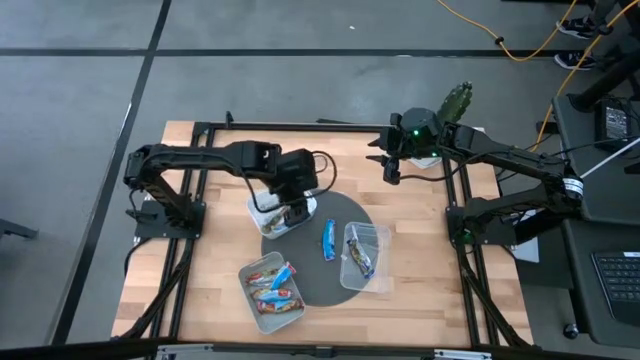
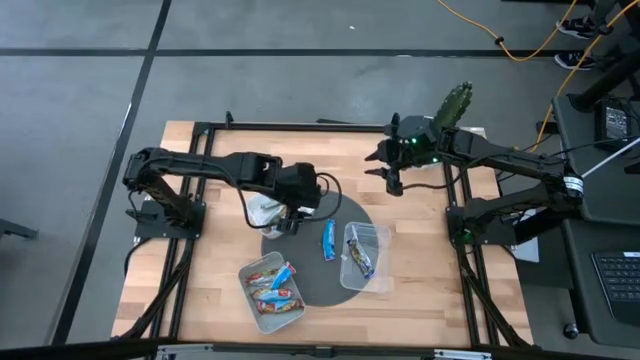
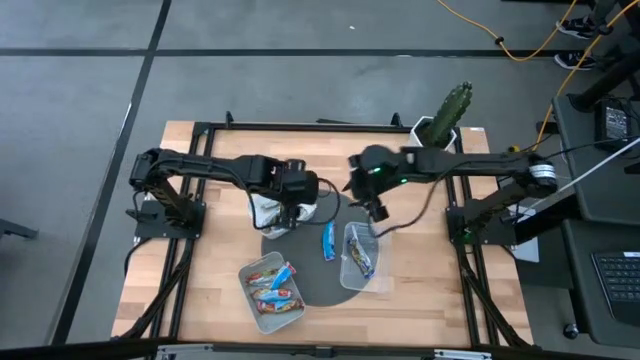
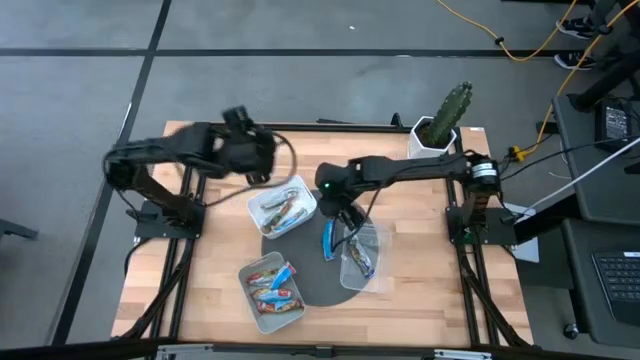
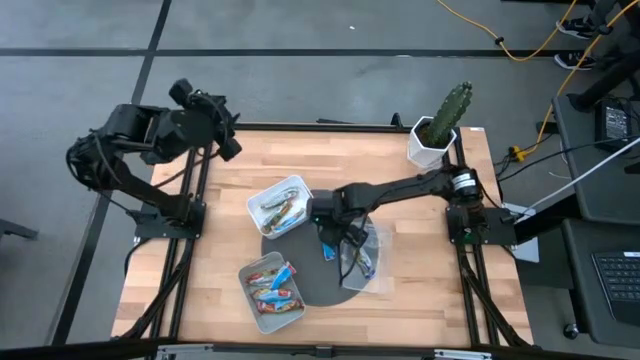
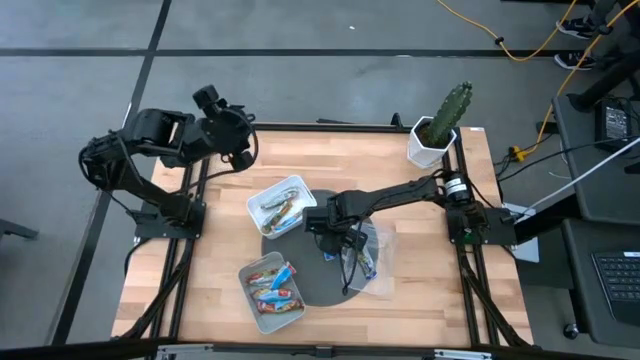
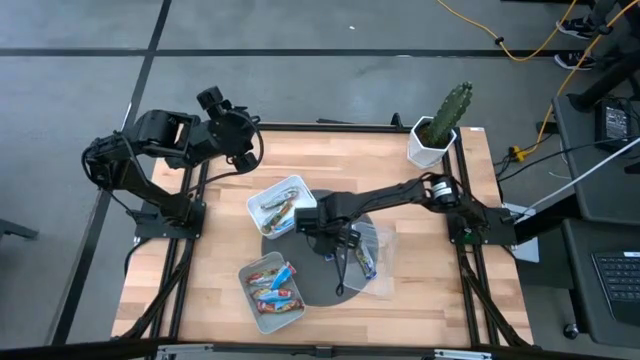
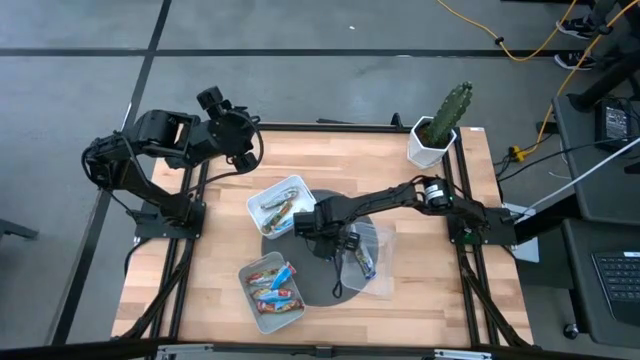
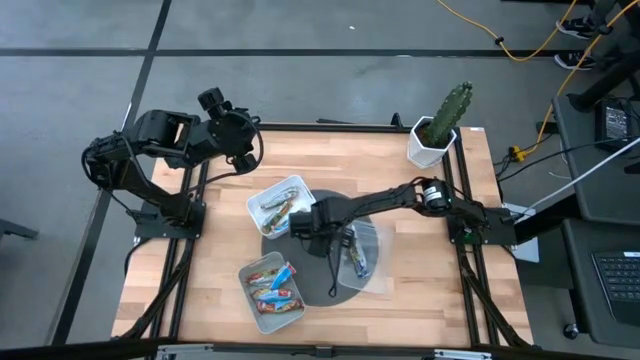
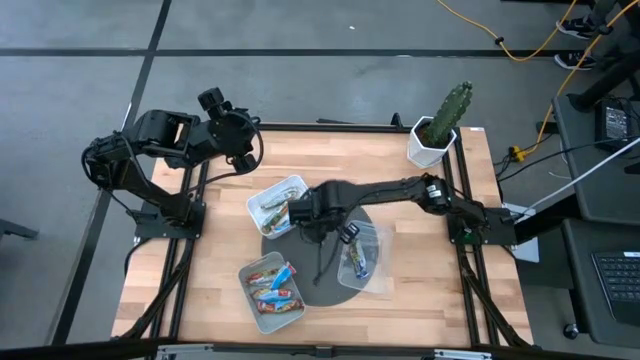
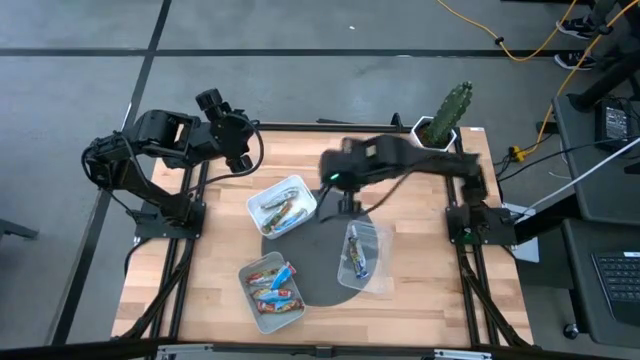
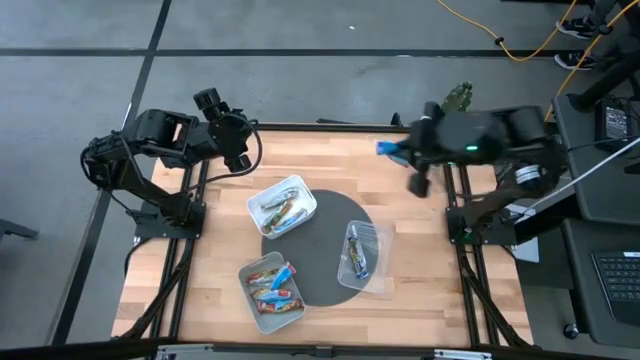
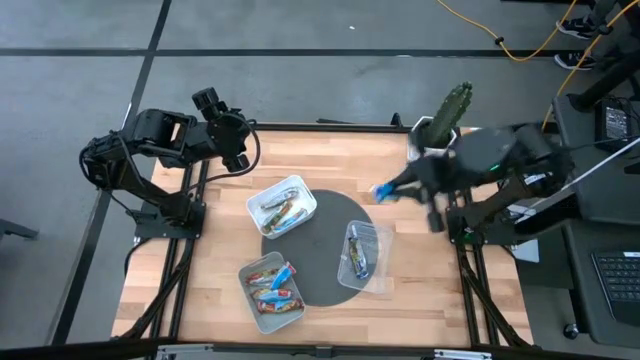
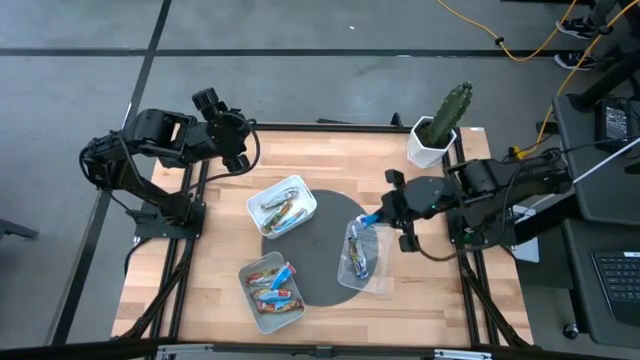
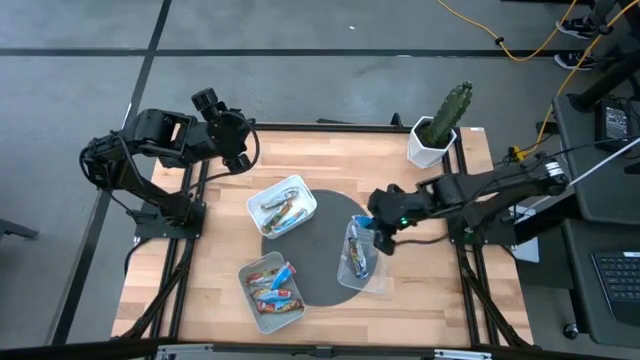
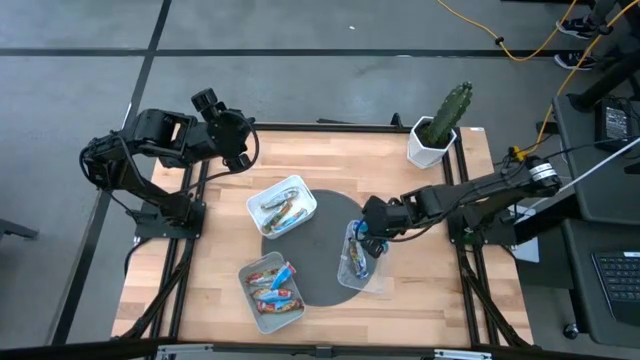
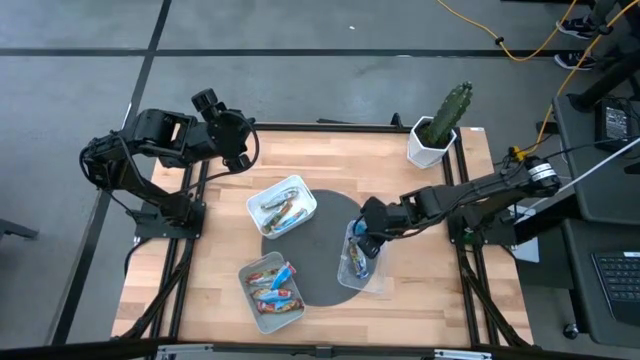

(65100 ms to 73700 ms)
Task: Pick and place Granola Bars by type
Put the blue granola bar into the transparent bin

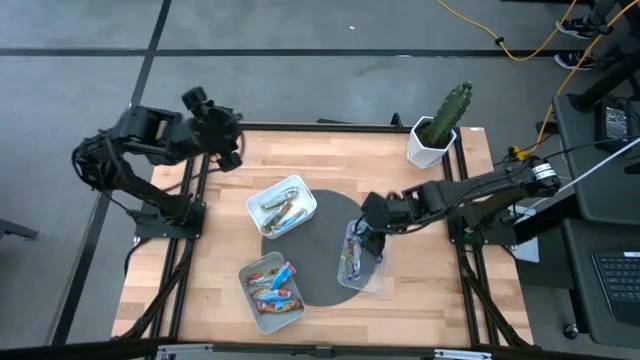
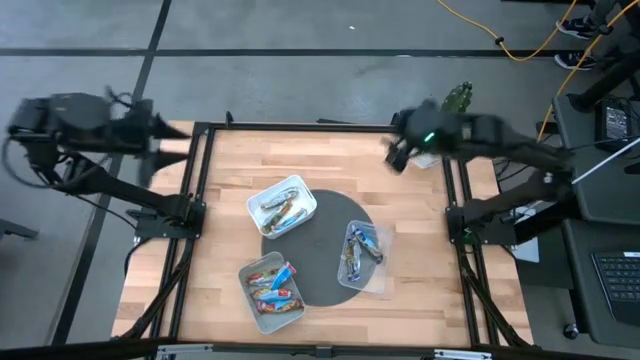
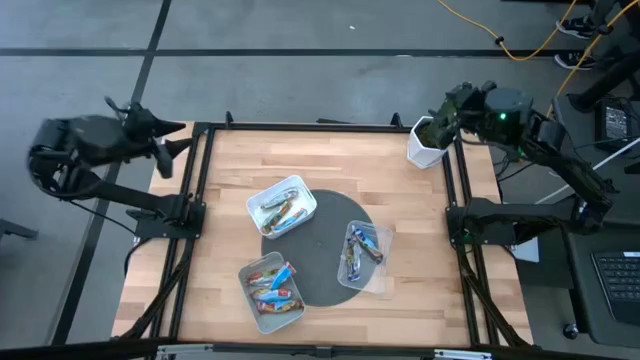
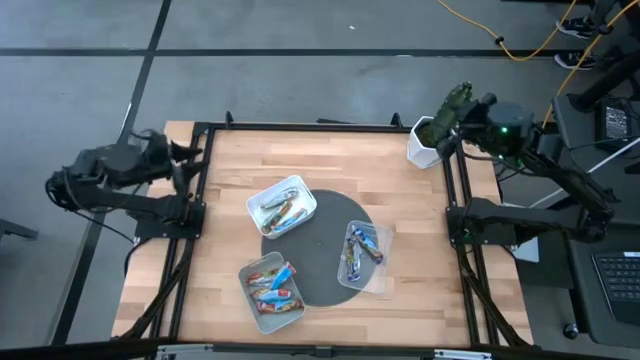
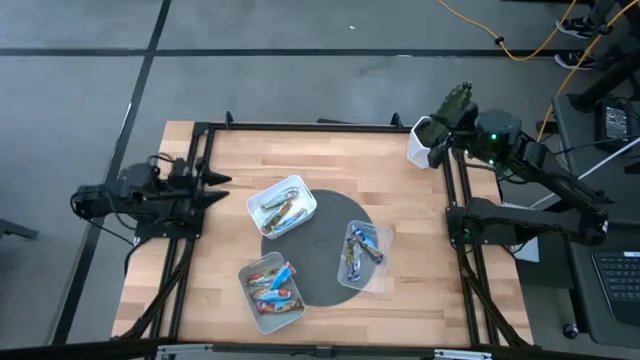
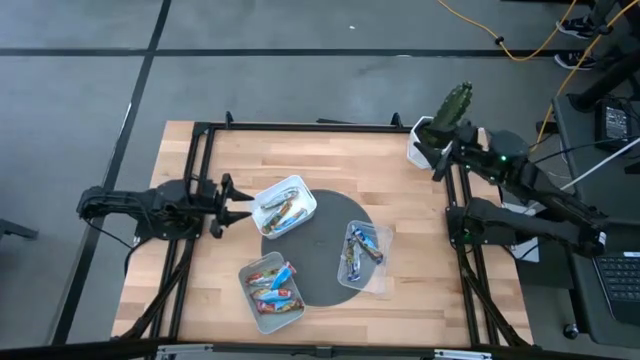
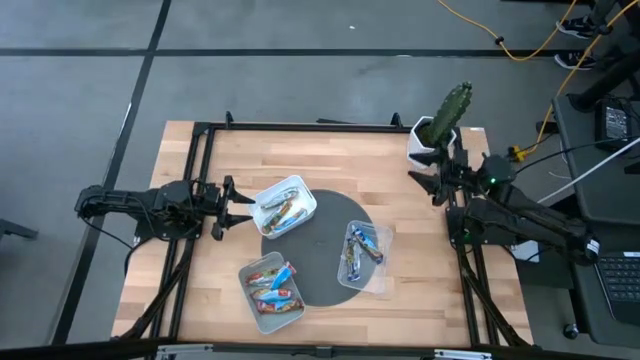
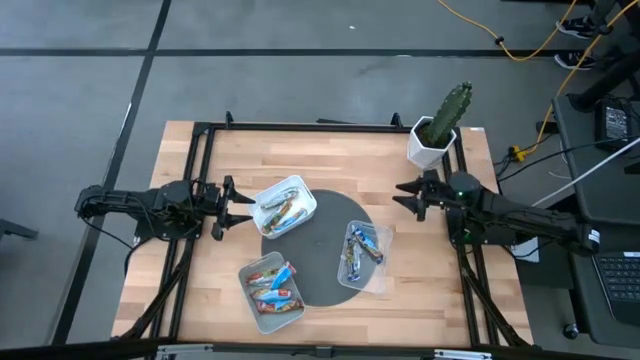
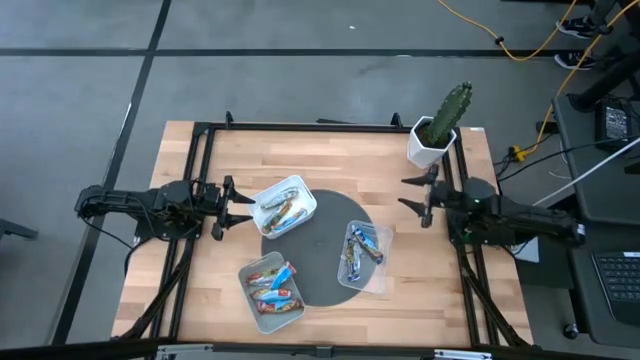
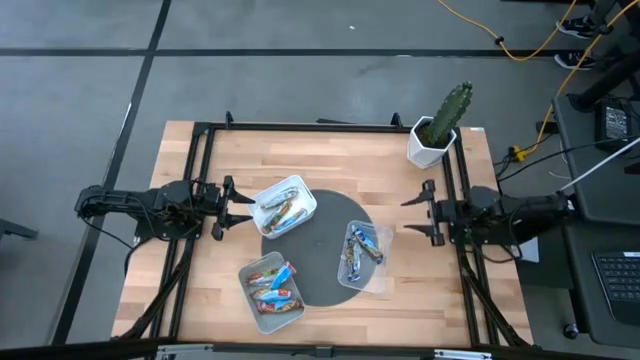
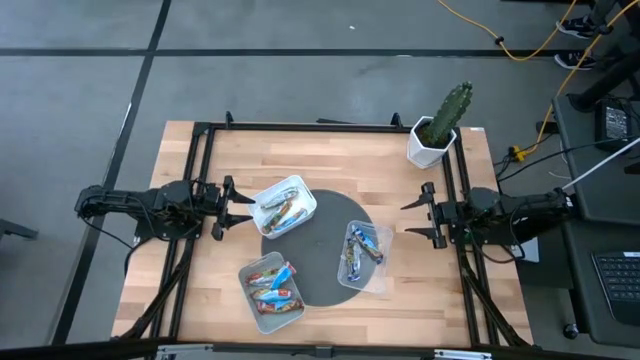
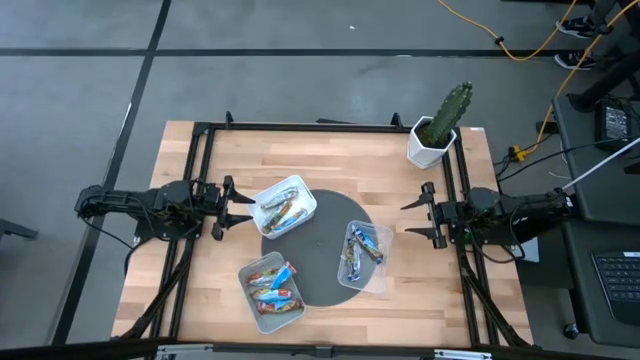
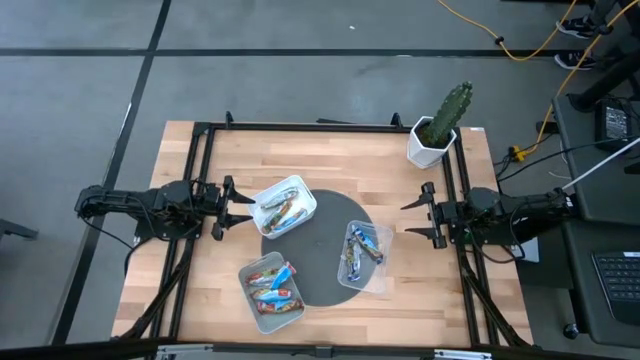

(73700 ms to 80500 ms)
Return to Home Position

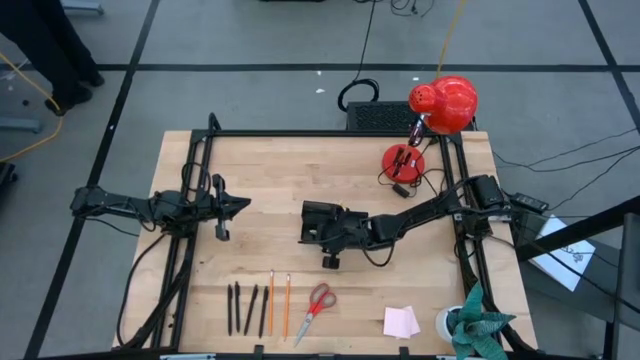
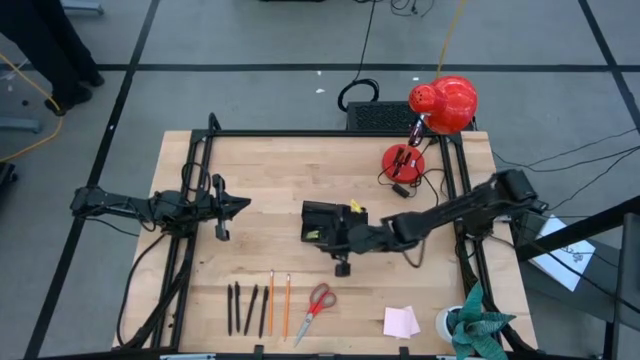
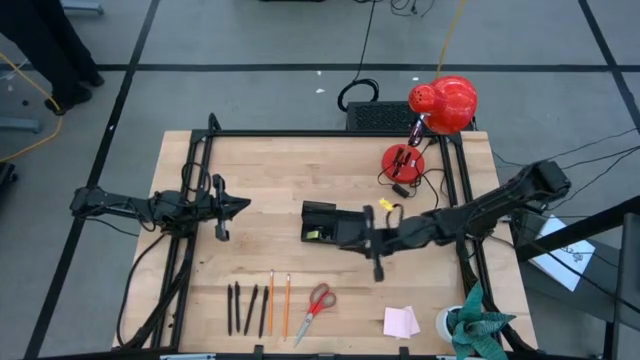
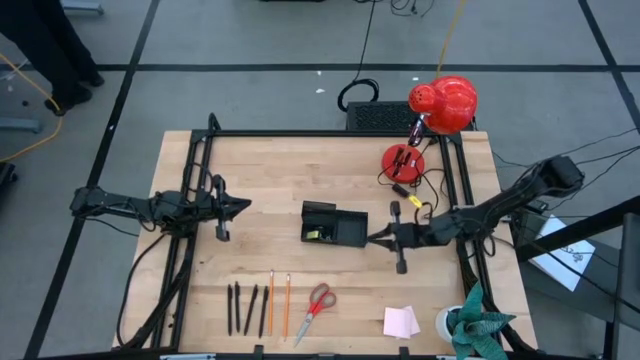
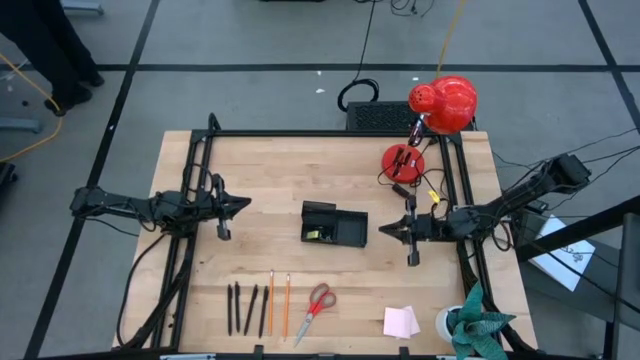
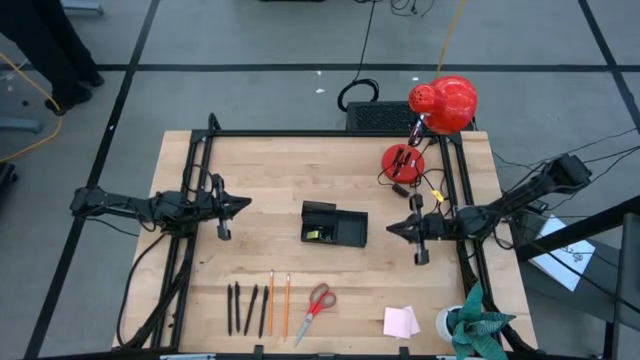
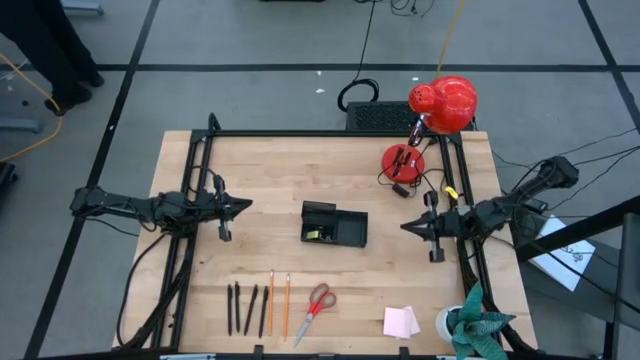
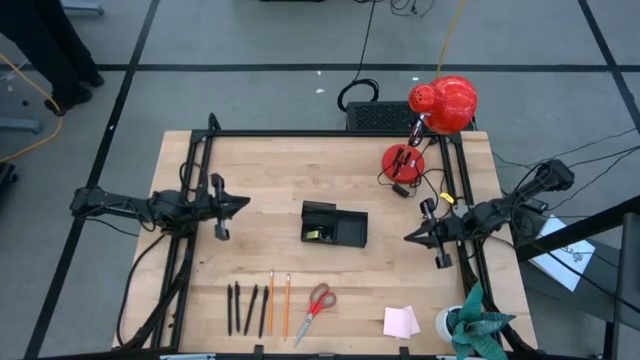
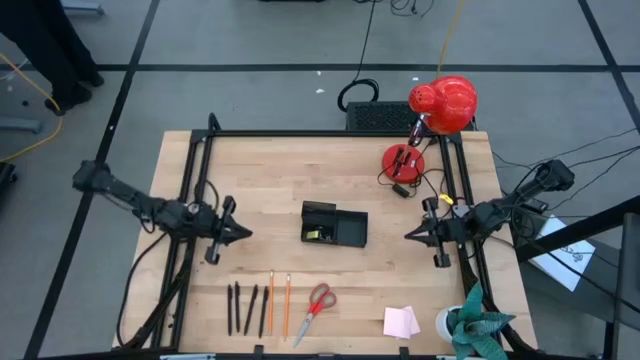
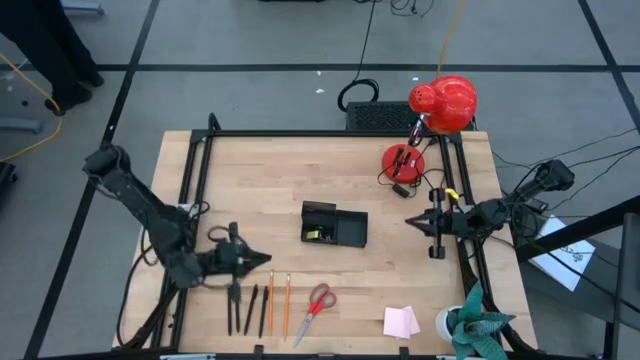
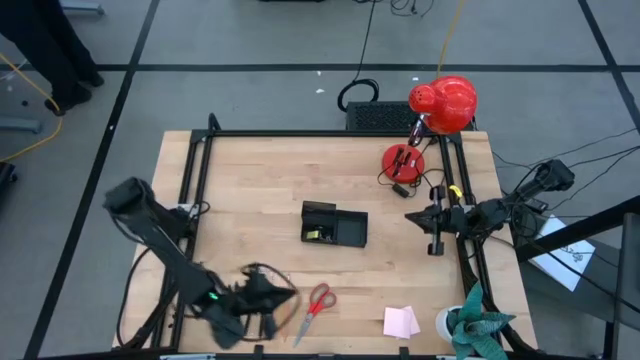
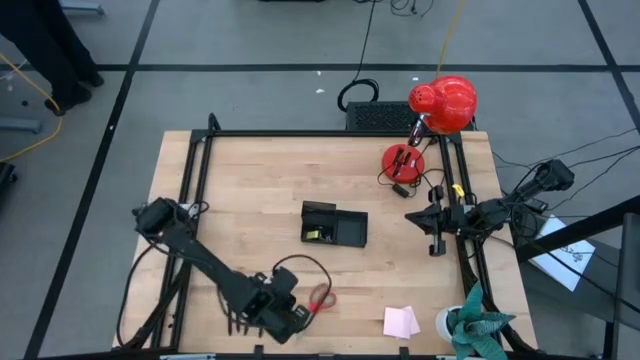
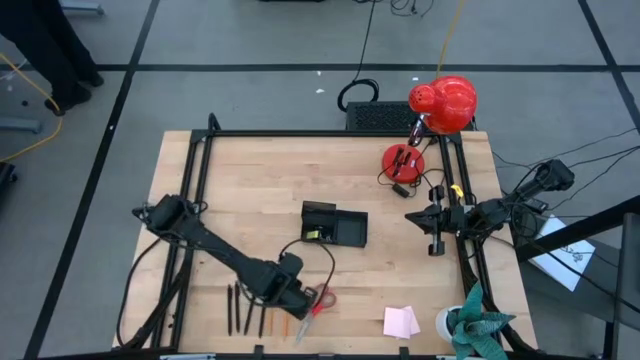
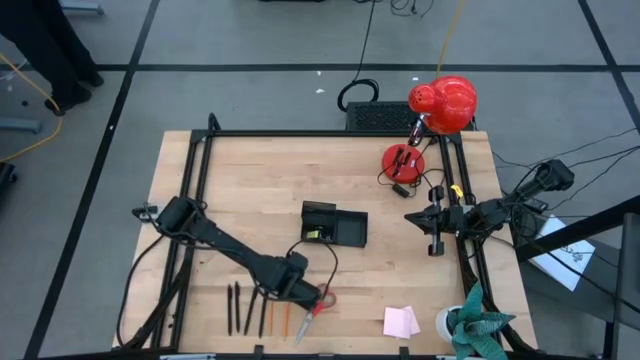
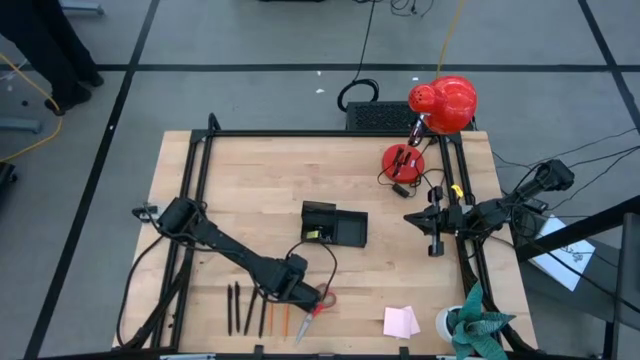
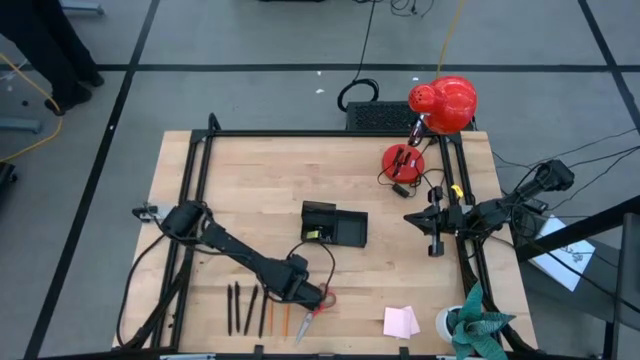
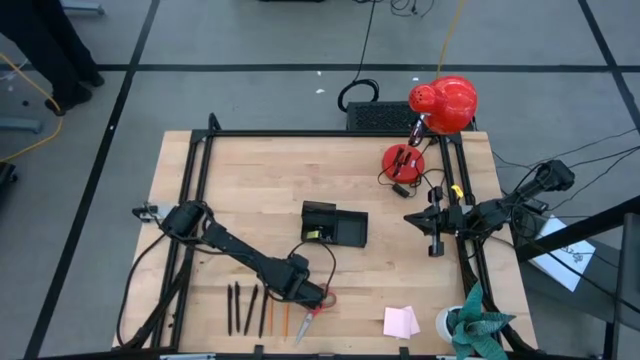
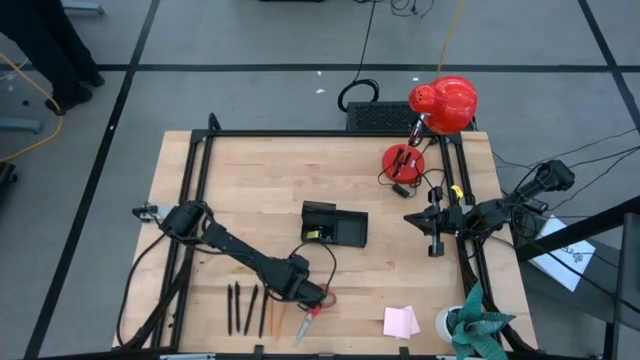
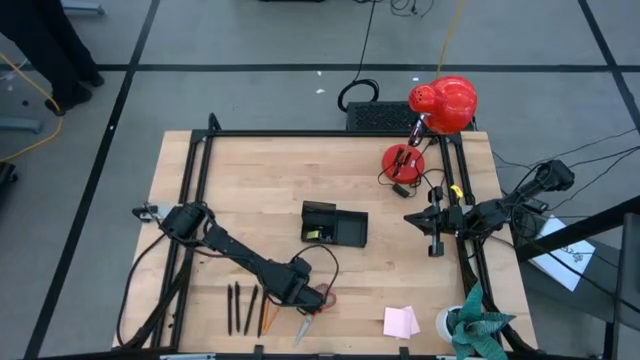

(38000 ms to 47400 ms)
Task: Pick and place office supplies into organizer
Put the right pencil into the desk organizer
